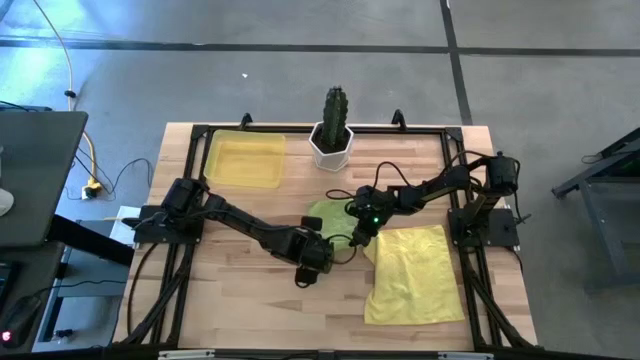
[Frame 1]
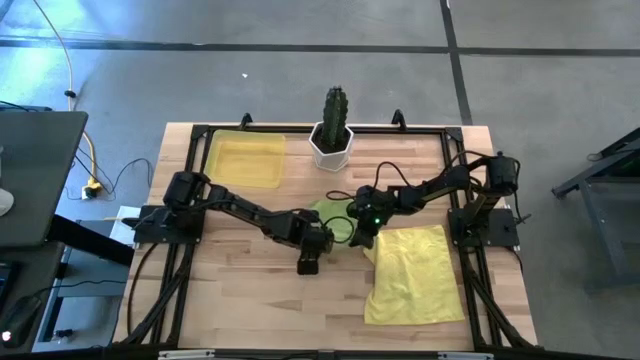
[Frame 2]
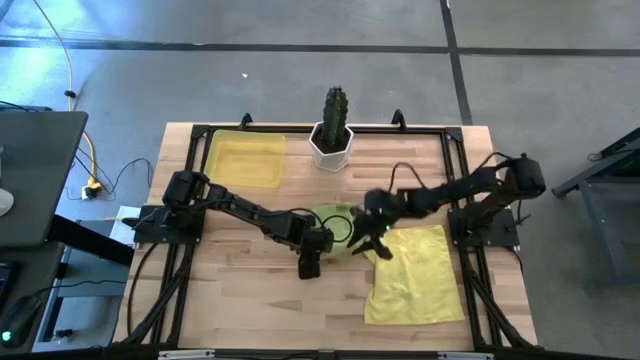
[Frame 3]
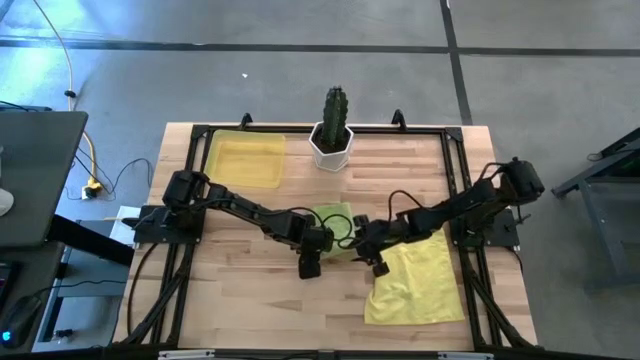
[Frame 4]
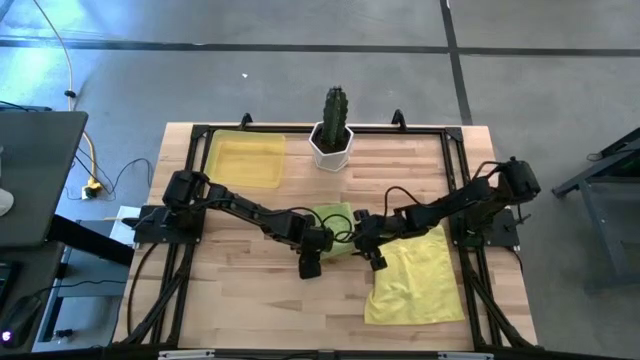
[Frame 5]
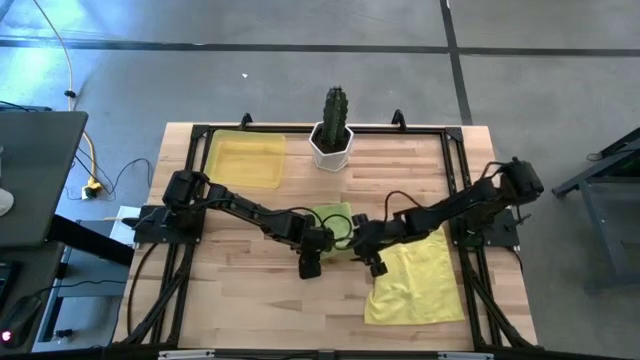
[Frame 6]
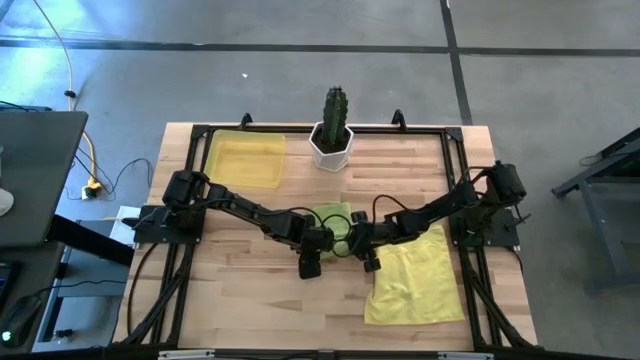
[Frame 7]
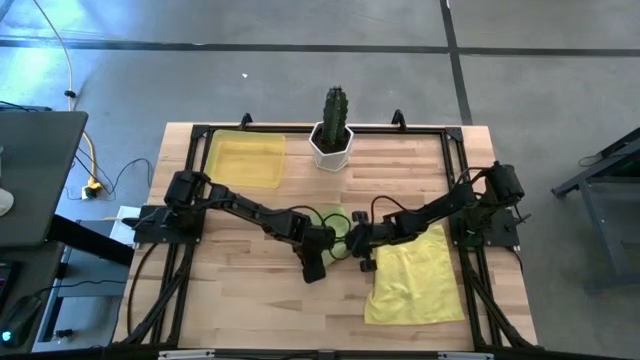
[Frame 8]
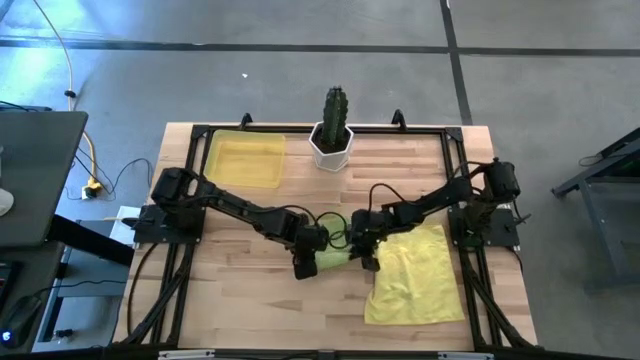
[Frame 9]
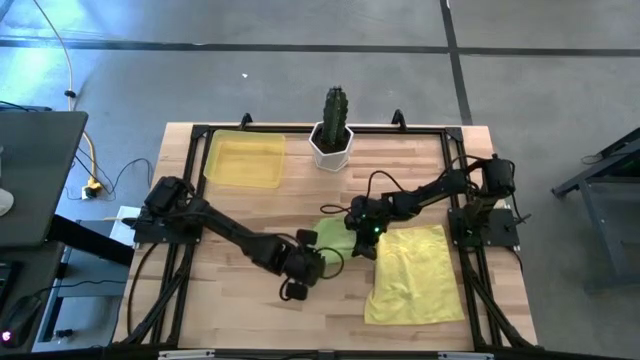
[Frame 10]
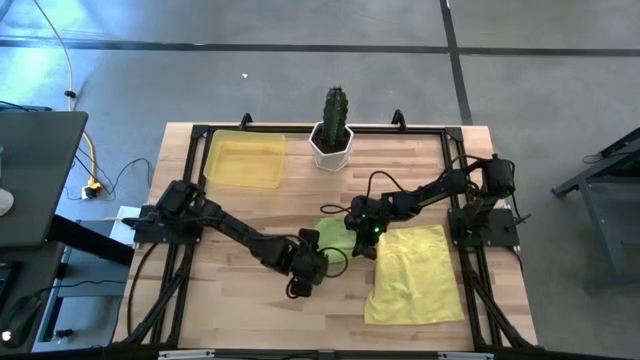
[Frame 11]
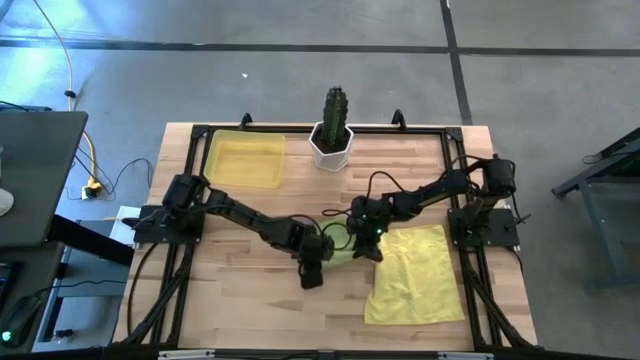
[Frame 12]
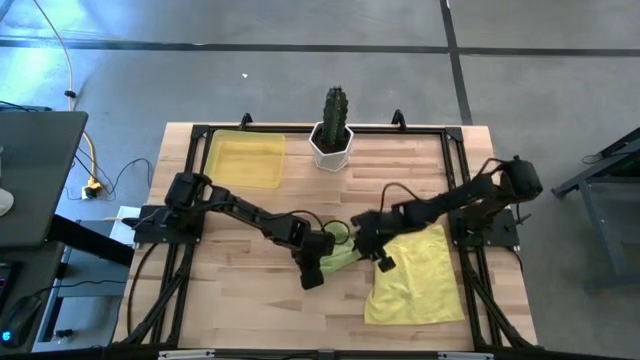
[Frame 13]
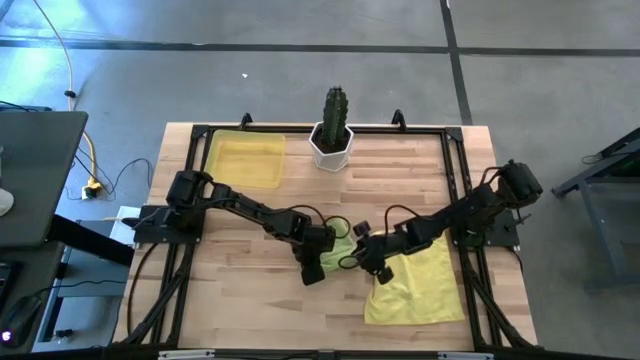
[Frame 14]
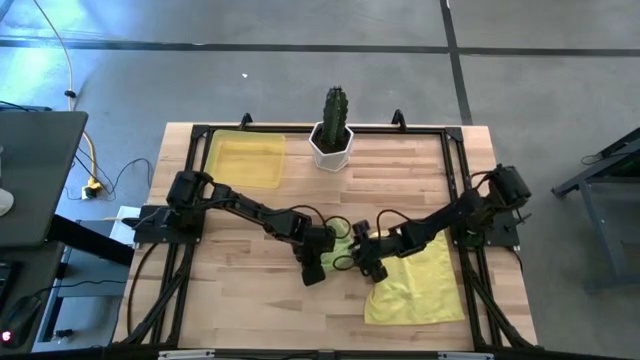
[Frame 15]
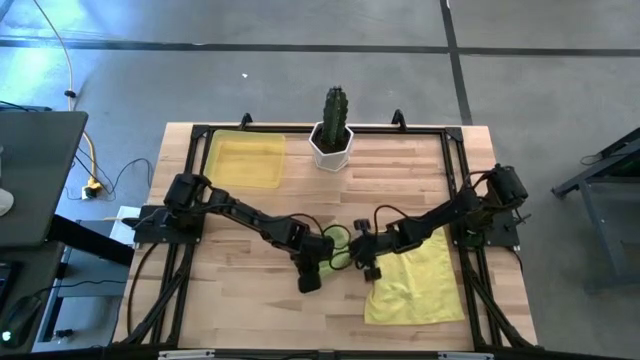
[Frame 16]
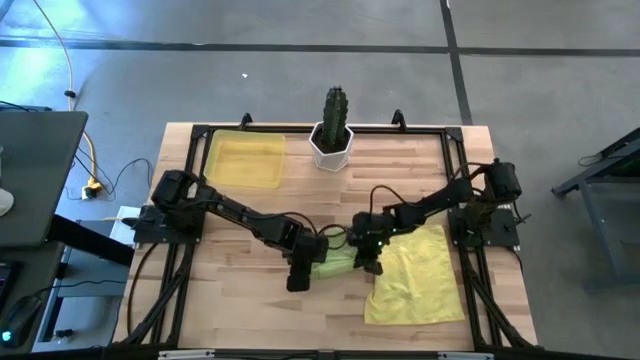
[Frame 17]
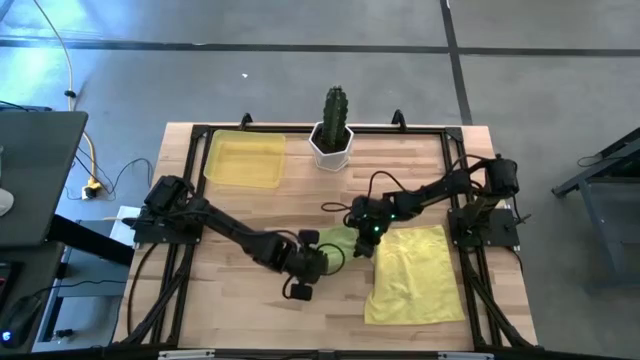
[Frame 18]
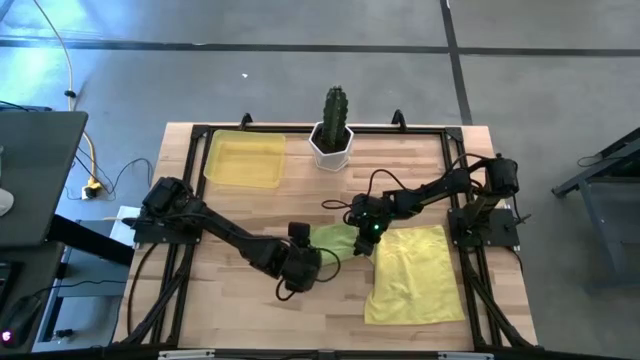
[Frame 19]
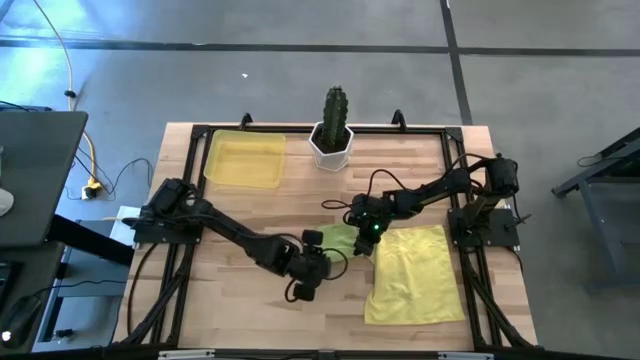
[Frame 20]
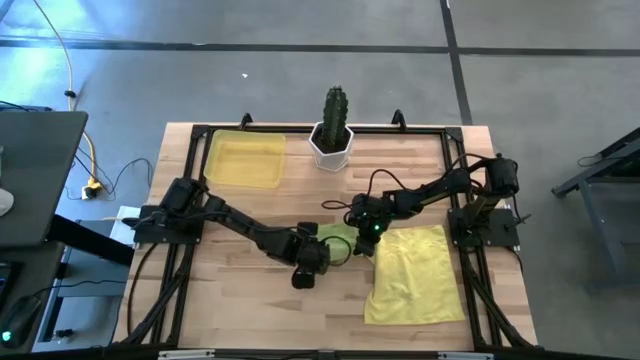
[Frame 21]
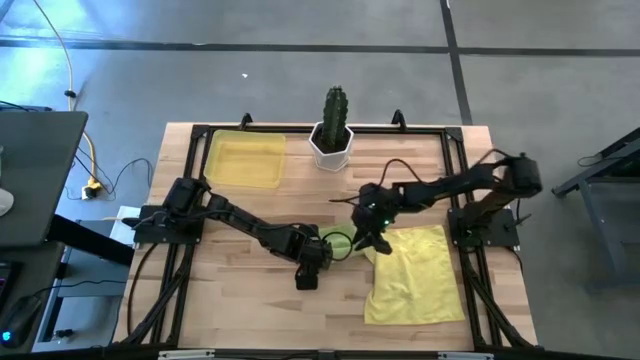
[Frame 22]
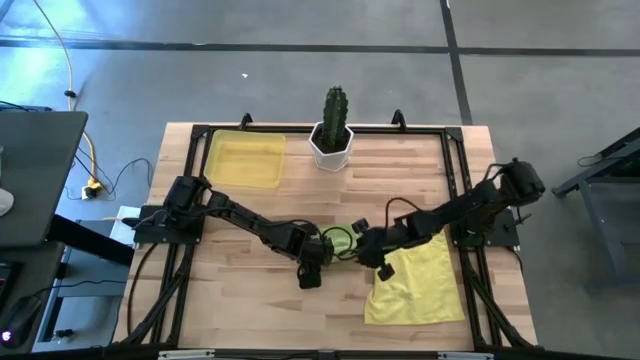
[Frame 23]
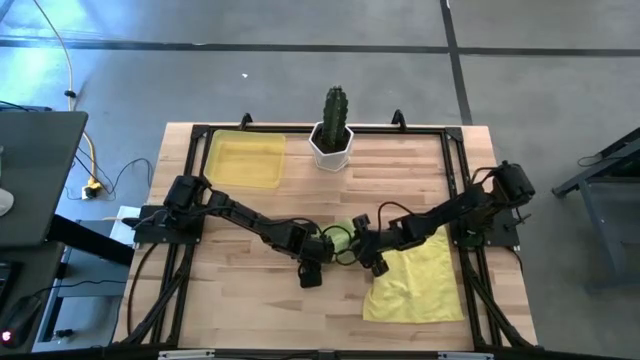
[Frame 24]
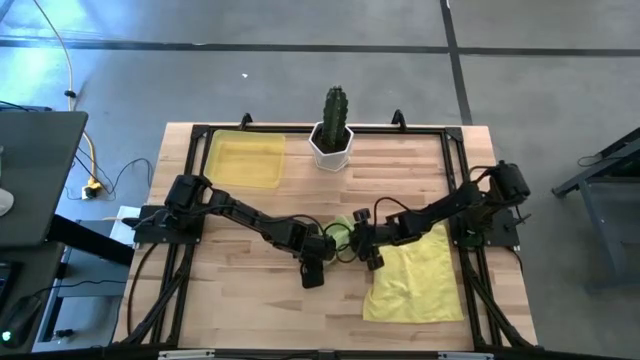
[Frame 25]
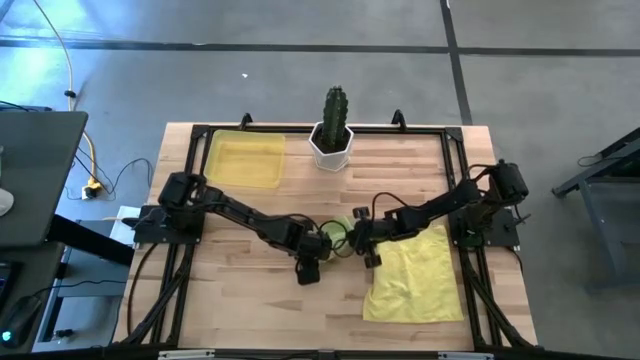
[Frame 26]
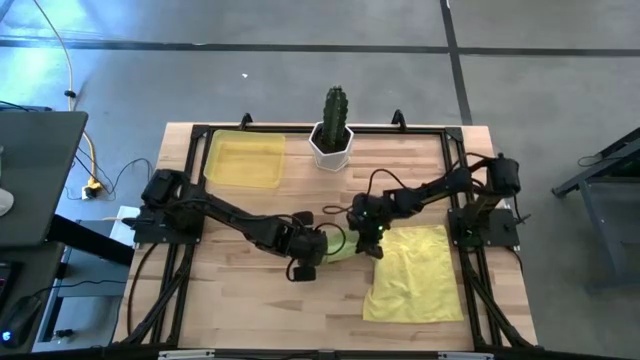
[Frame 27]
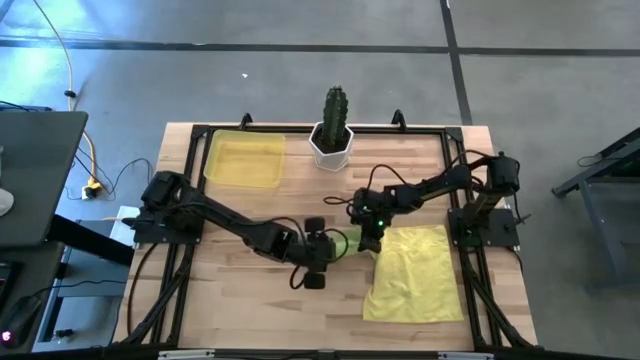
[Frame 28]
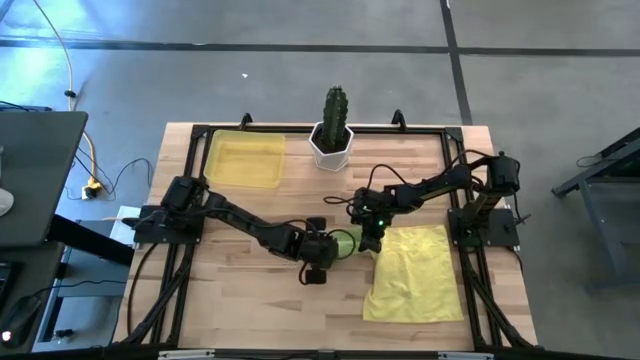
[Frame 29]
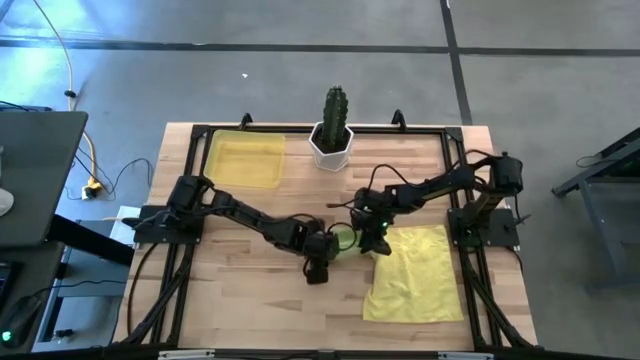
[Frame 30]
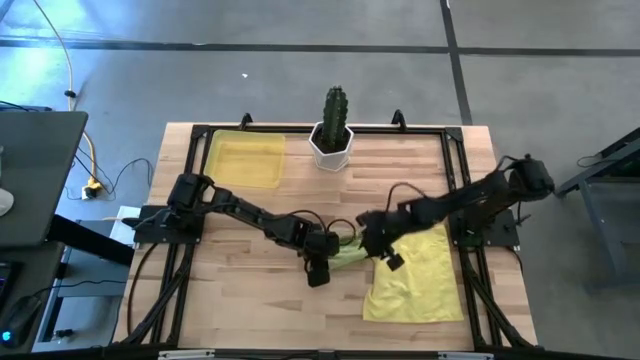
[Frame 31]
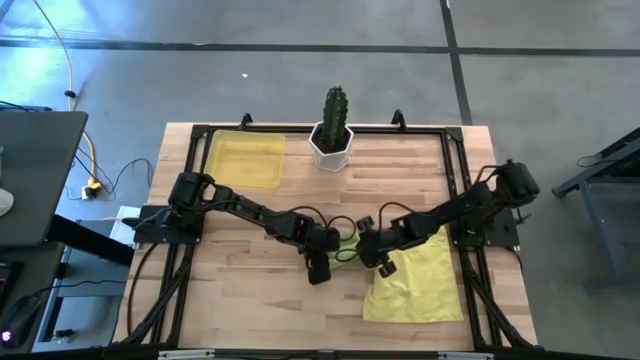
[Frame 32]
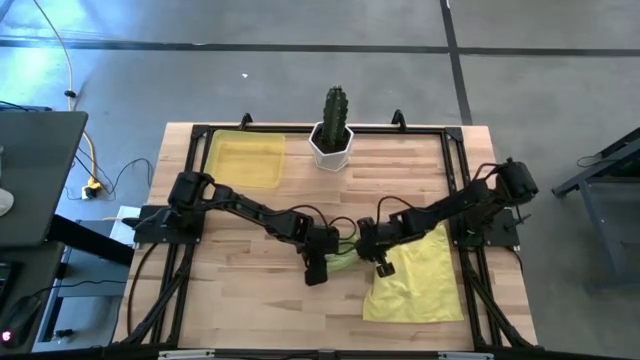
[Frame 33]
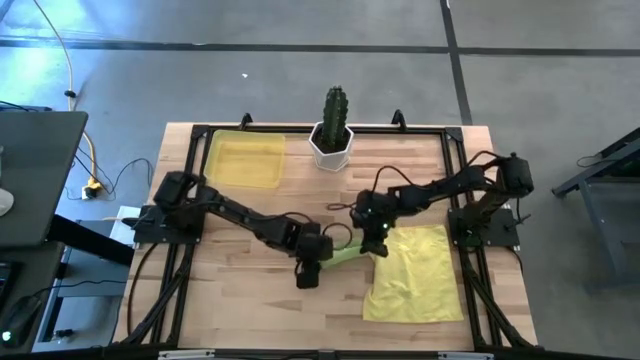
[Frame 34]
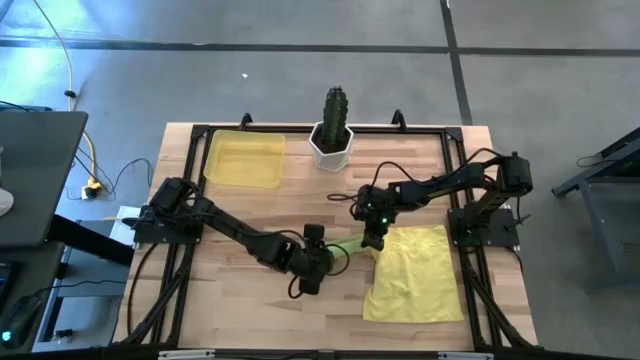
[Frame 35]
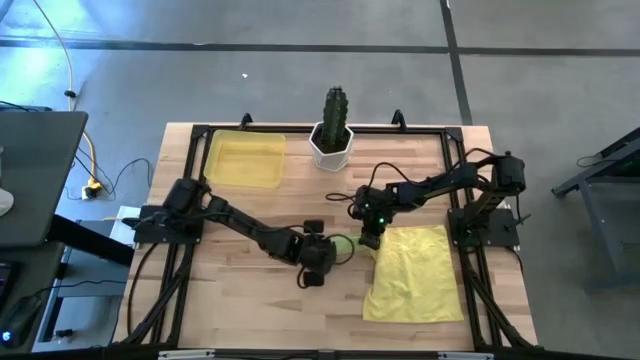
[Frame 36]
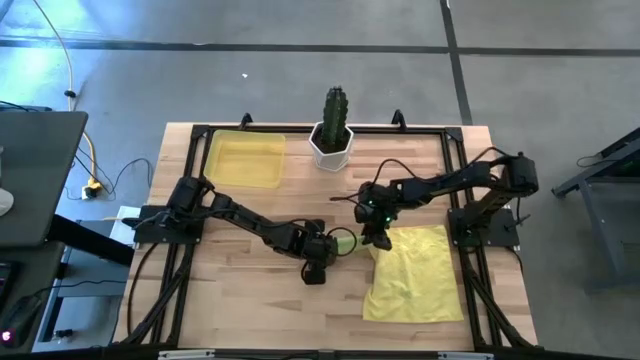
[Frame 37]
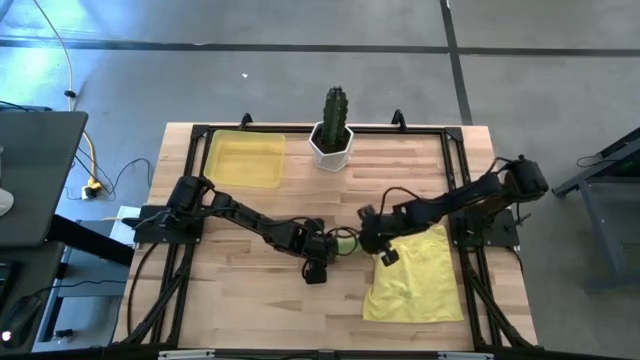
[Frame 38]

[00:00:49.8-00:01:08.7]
Task: Roll microfiber towels into tight, uniform cylinder then place into a basket
Roll the green microfiber towel

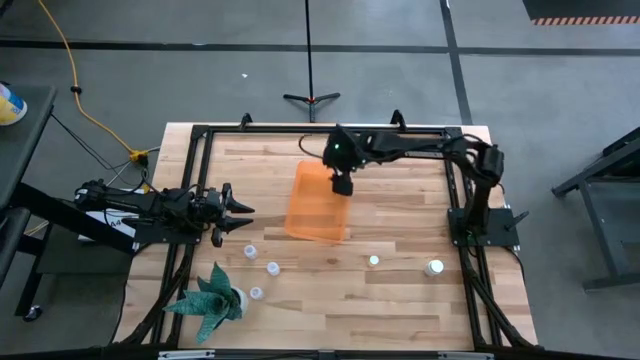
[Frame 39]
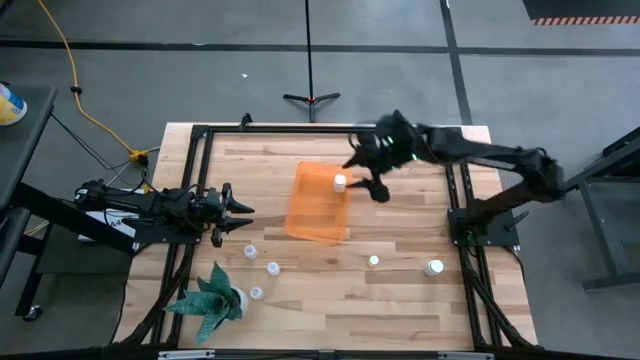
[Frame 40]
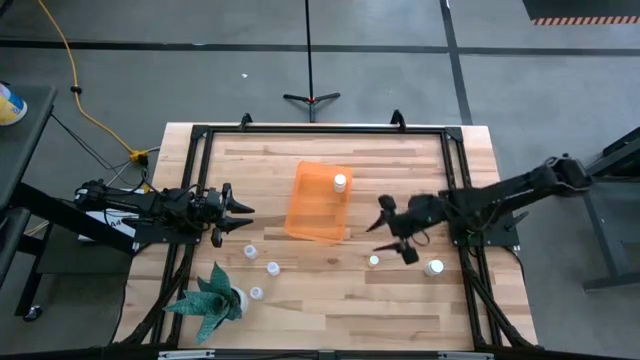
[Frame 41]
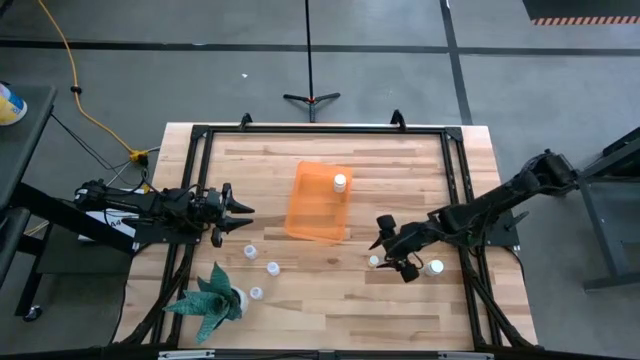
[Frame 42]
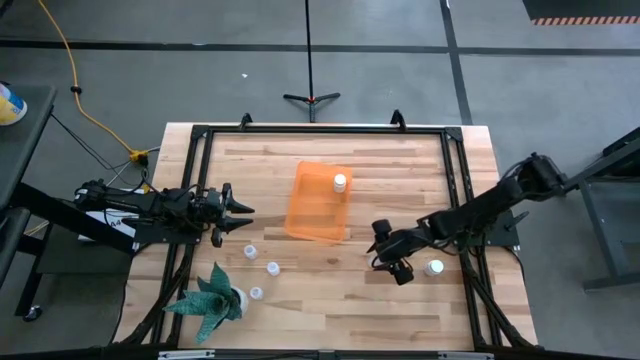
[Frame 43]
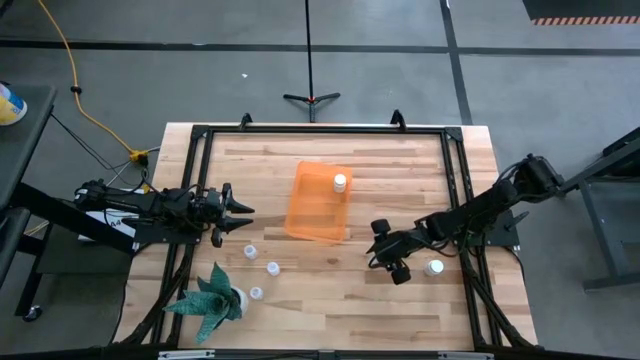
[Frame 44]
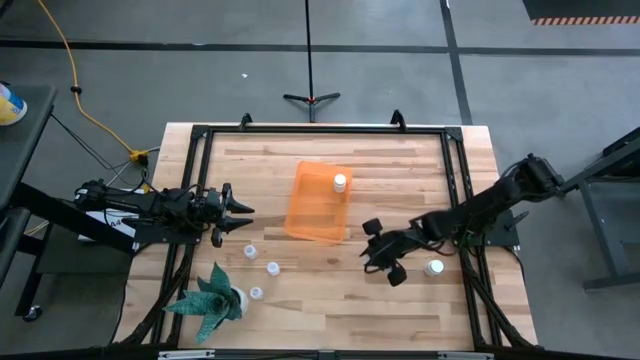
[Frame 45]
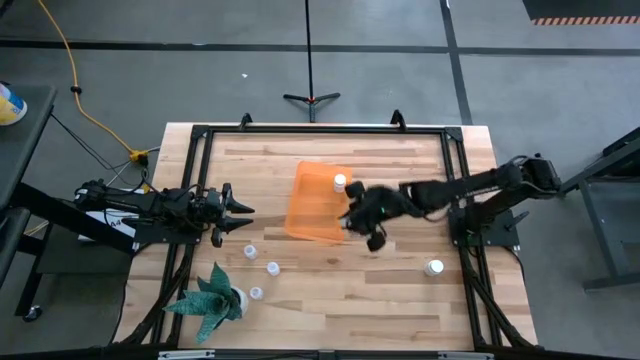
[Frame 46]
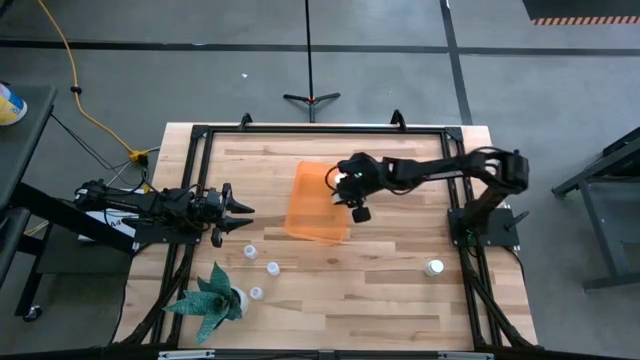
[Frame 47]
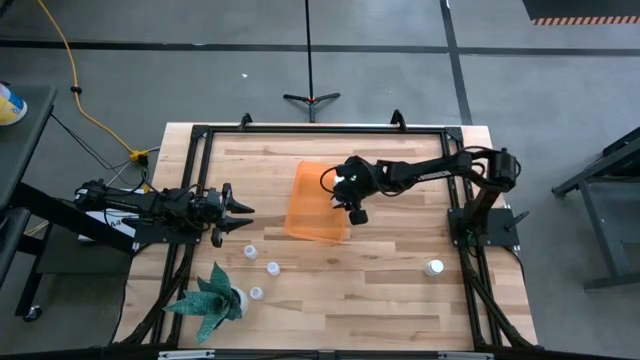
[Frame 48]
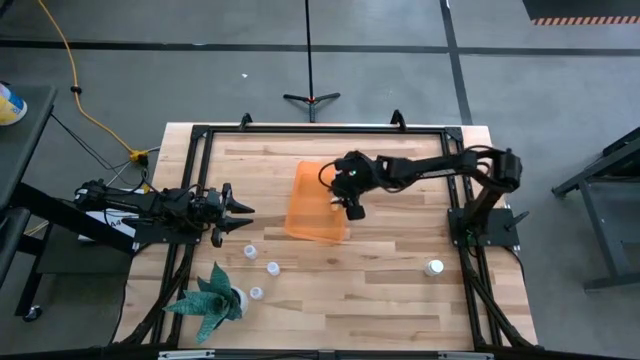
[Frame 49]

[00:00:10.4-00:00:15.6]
Task: Pick and place pill bottles into a basket
Put the yellow pill bottle into the orange bin
